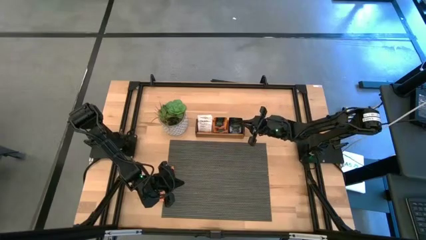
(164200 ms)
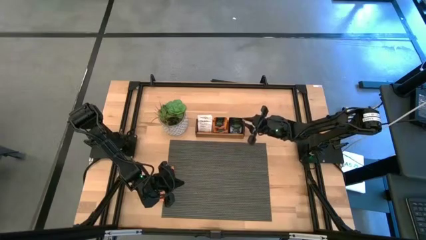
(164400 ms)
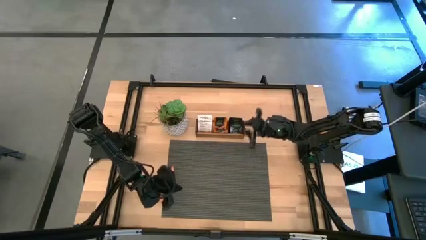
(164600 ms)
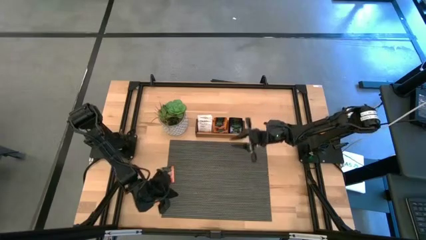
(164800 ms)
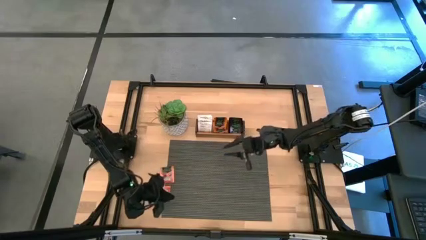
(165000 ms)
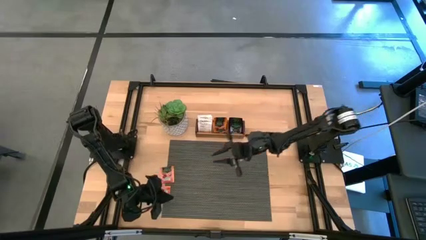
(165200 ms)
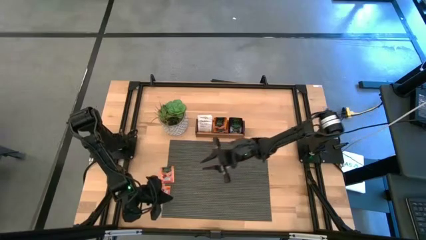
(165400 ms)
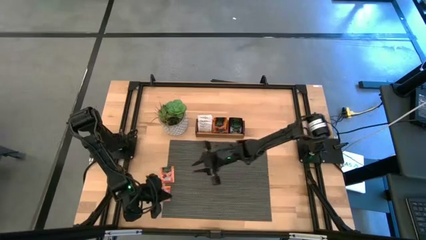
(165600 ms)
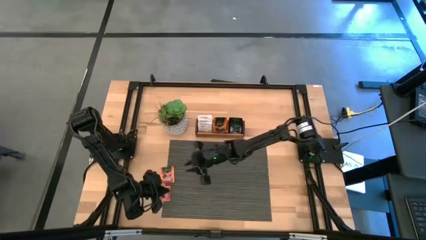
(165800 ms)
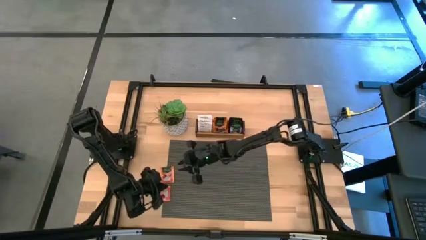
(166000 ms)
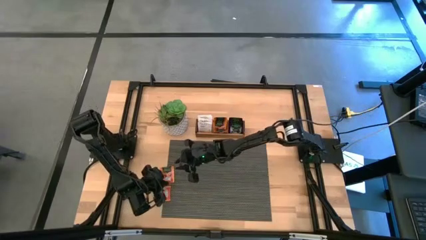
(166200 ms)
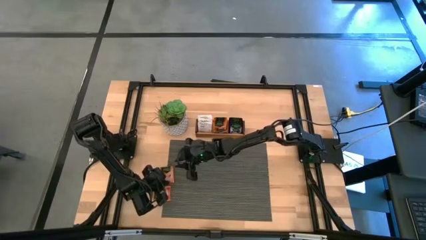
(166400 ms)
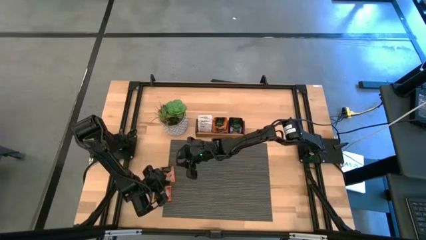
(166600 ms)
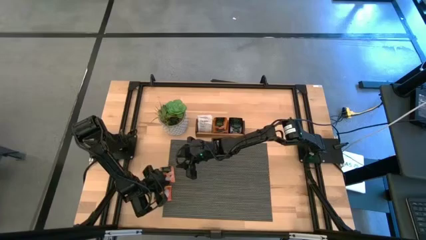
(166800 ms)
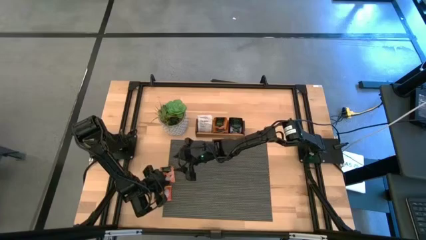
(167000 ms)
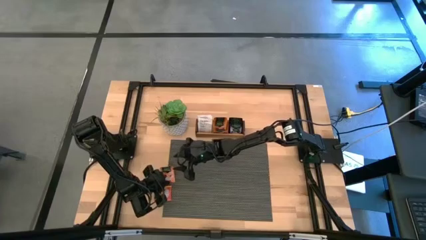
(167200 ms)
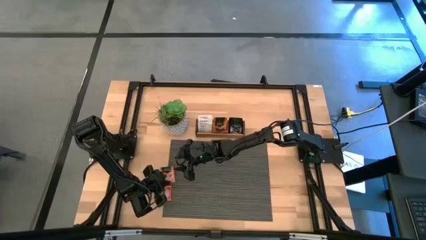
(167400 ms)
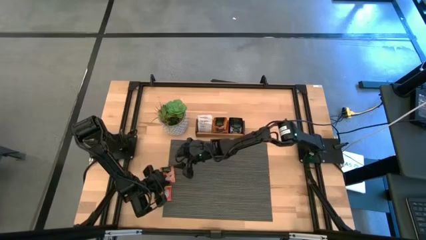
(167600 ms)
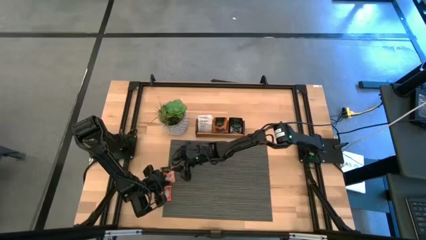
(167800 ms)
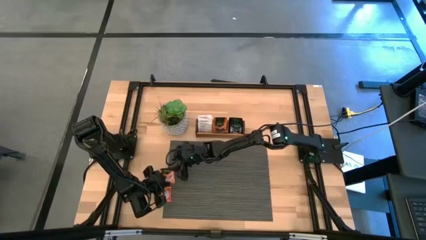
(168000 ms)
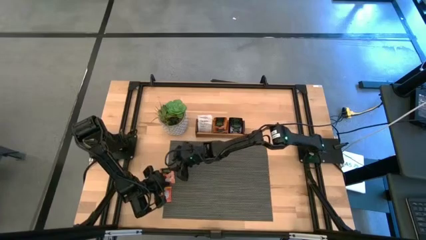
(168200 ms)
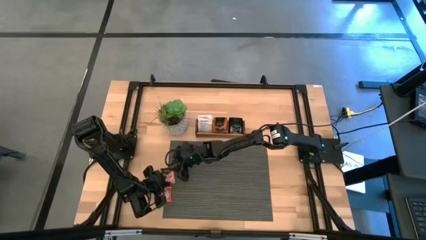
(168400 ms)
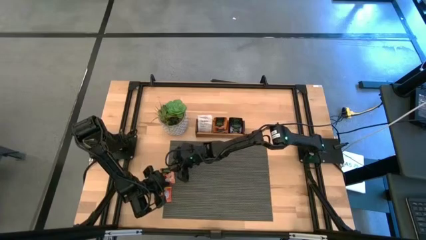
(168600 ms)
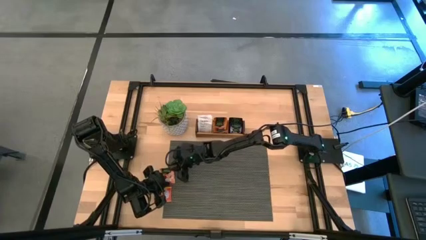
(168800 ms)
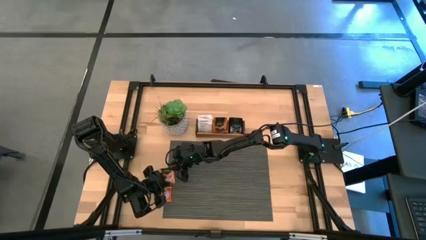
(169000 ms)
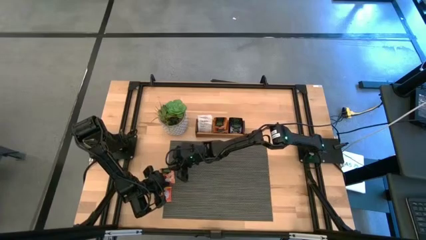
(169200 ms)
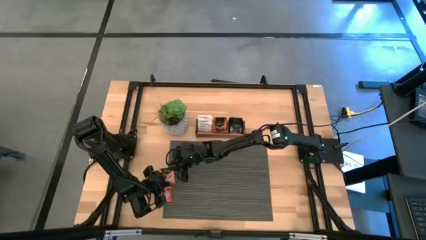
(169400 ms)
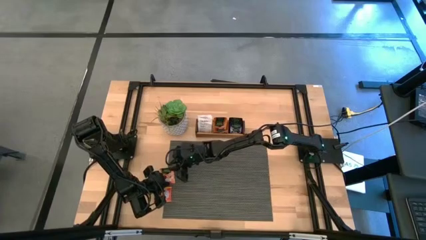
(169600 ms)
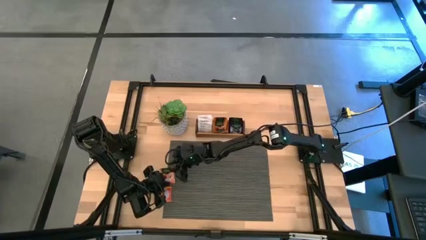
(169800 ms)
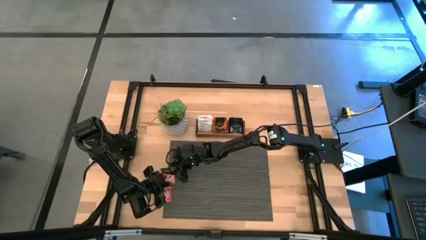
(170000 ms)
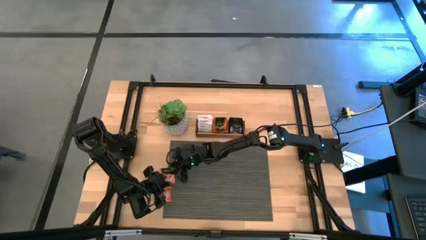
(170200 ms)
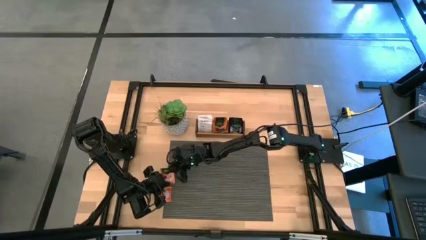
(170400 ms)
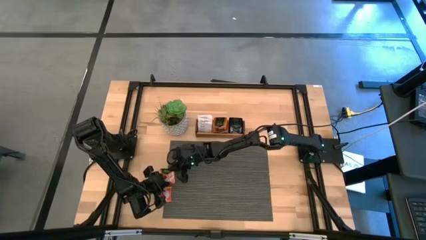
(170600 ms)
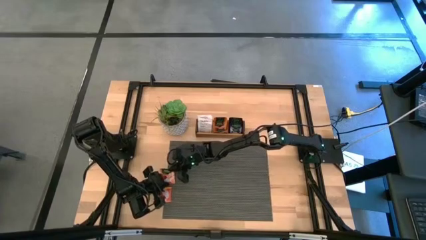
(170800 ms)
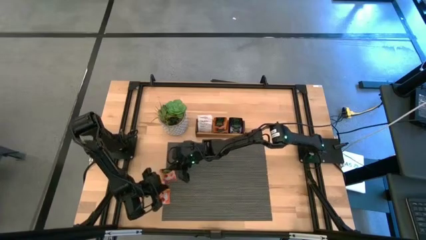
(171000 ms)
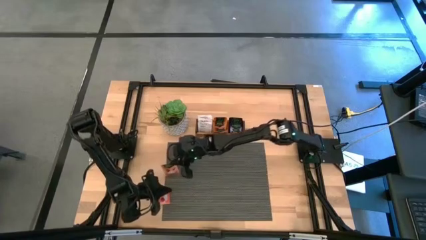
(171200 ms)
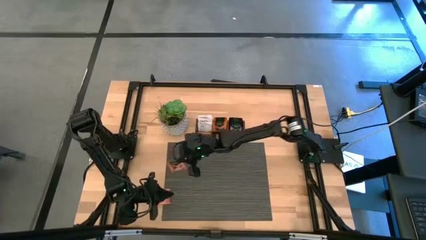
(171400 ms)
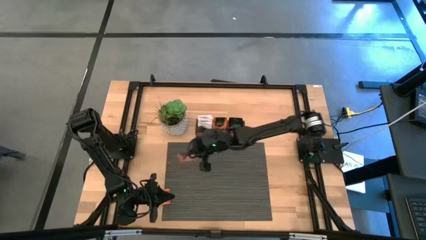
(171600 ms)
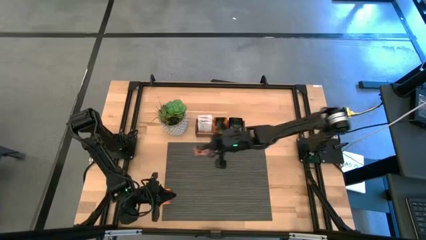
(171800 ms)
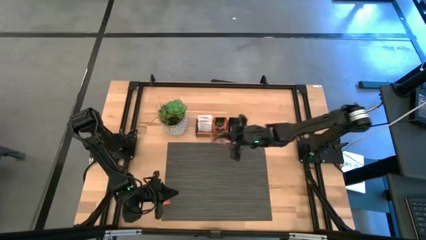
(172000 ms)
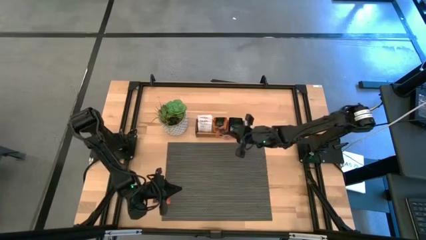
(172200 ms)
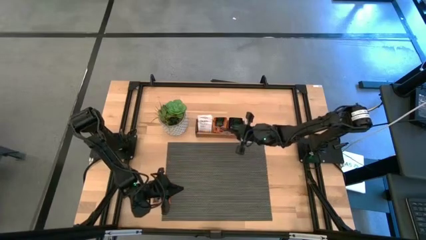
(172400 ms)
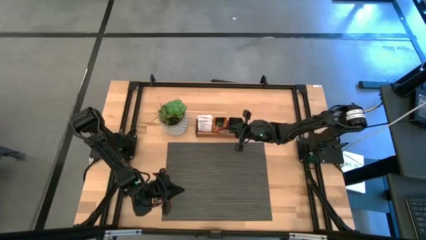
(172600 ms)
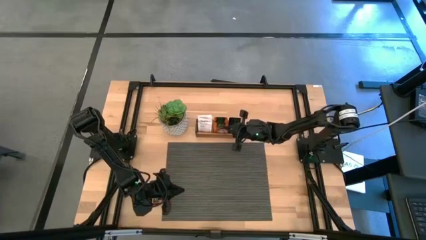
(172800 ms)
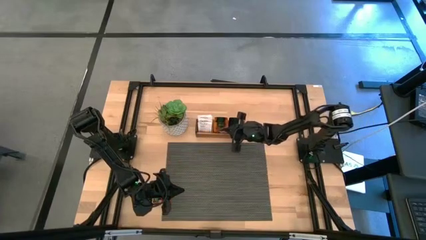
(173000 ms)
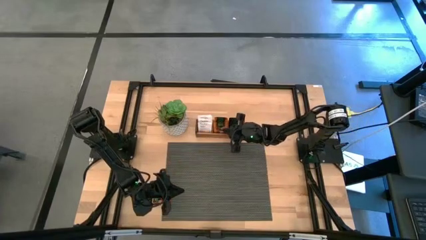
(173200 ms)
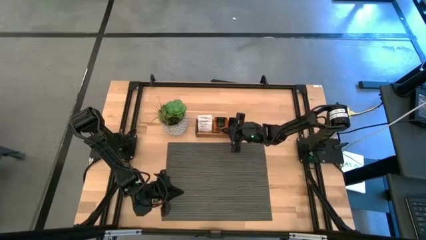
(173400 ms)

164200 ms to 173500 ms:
Task: Pick & Place Tea
Put the orange tea bag into the middle section of the wooden organizer

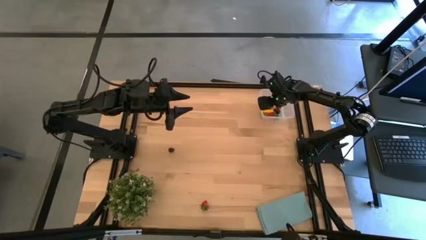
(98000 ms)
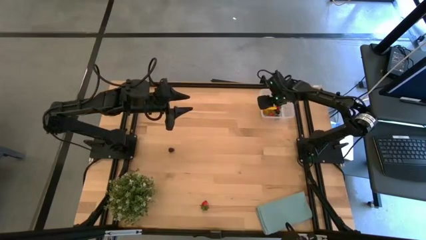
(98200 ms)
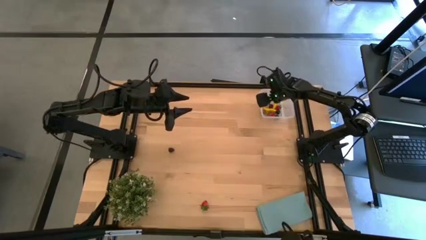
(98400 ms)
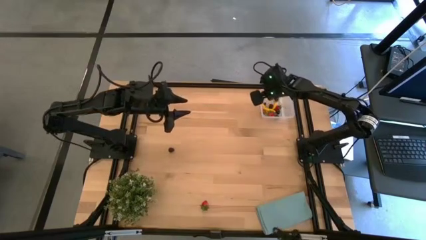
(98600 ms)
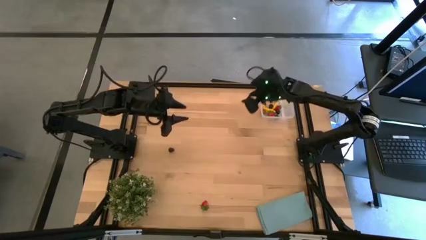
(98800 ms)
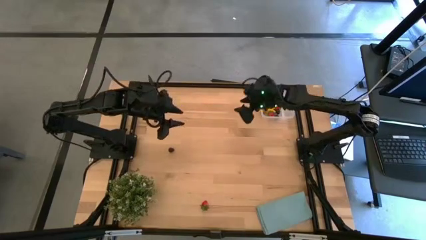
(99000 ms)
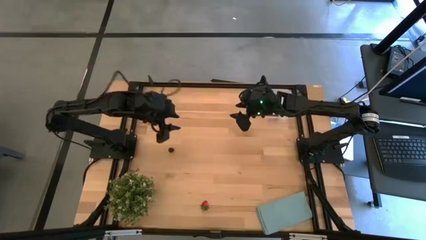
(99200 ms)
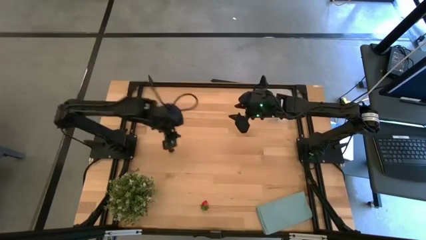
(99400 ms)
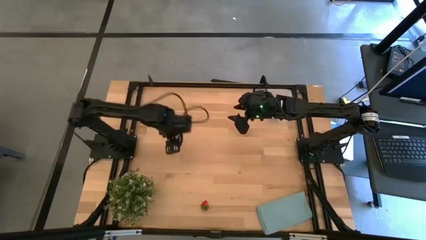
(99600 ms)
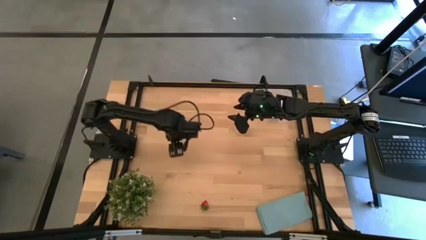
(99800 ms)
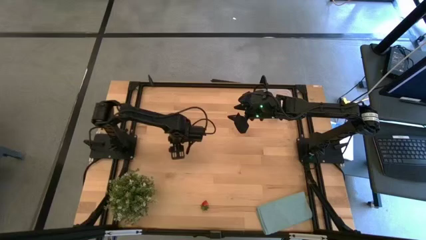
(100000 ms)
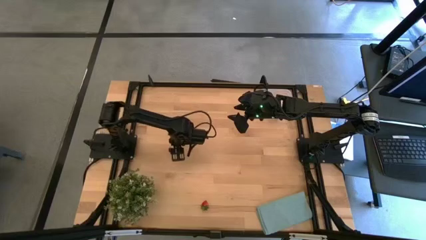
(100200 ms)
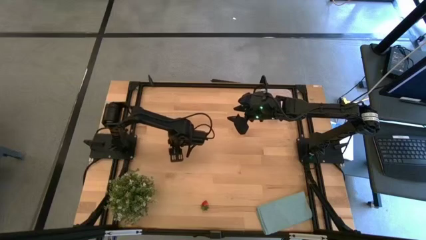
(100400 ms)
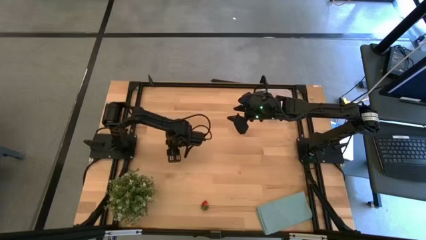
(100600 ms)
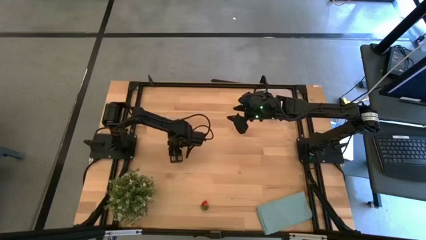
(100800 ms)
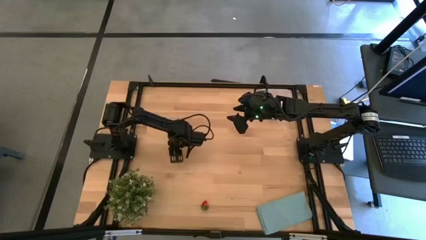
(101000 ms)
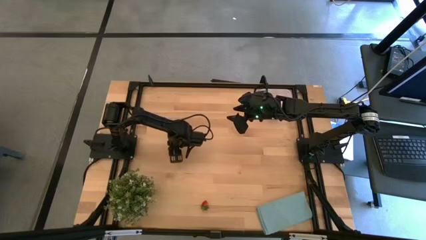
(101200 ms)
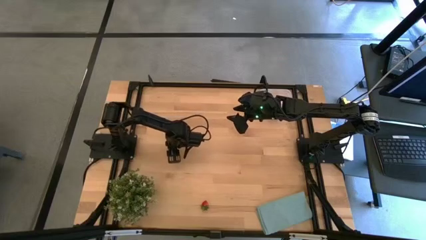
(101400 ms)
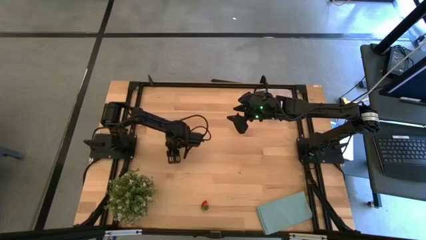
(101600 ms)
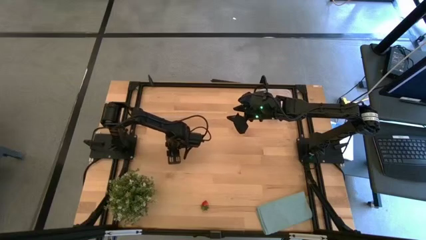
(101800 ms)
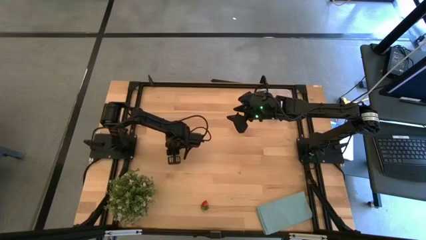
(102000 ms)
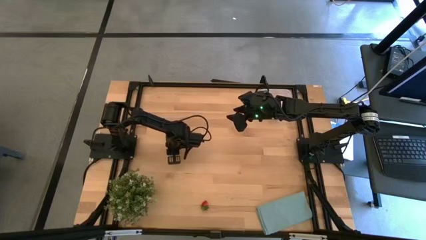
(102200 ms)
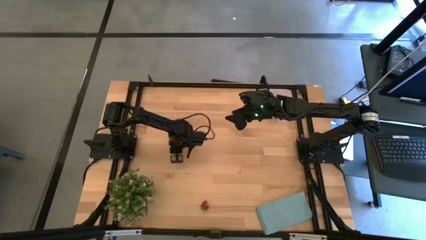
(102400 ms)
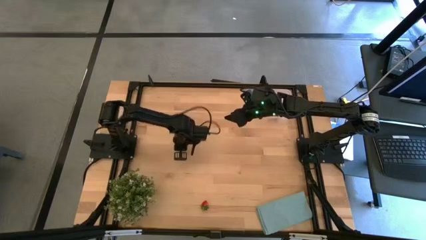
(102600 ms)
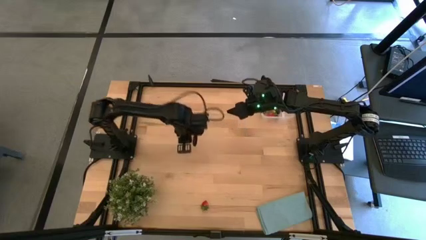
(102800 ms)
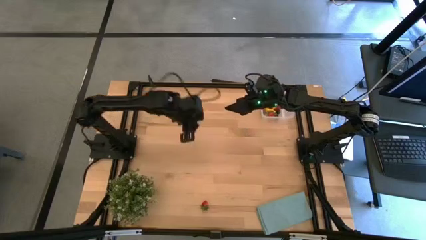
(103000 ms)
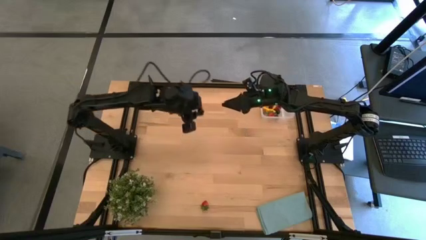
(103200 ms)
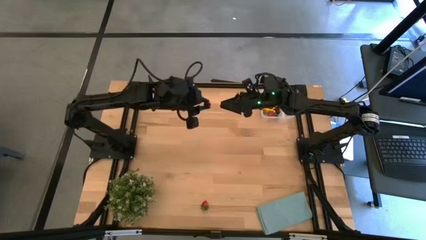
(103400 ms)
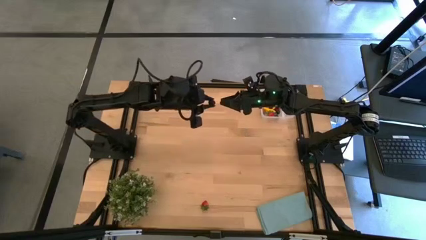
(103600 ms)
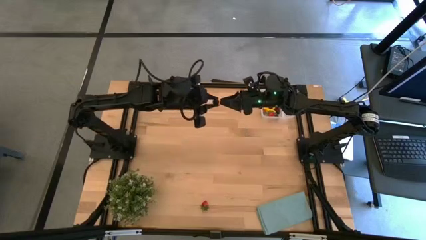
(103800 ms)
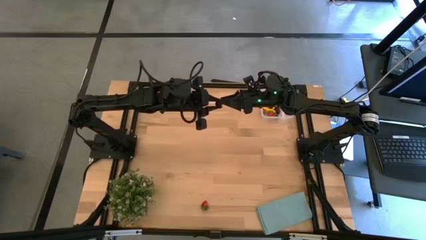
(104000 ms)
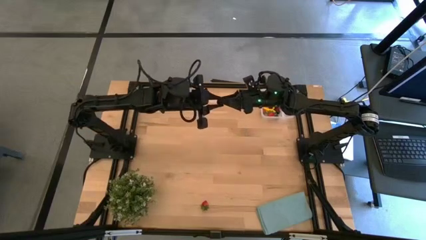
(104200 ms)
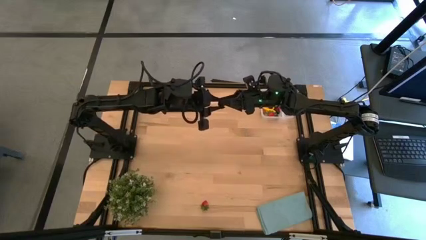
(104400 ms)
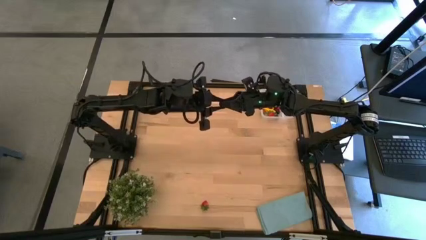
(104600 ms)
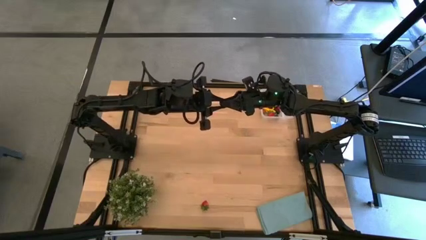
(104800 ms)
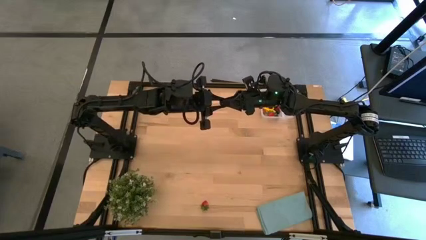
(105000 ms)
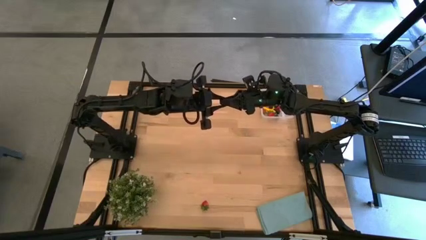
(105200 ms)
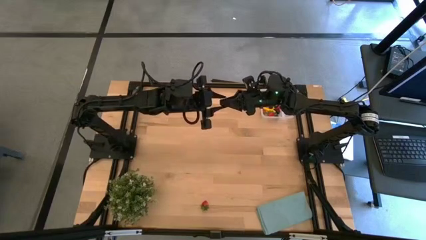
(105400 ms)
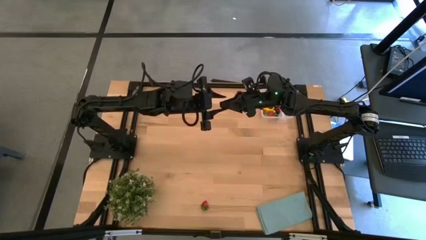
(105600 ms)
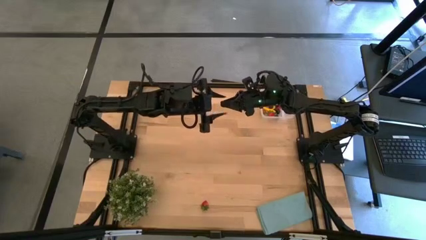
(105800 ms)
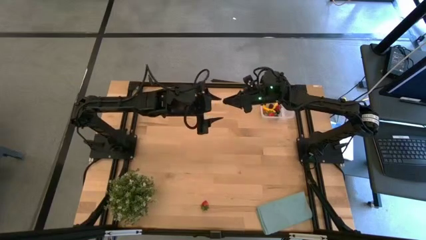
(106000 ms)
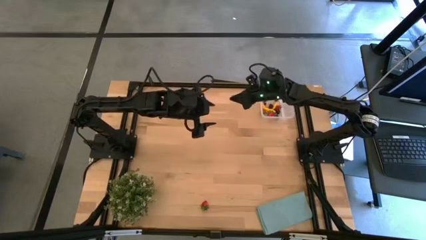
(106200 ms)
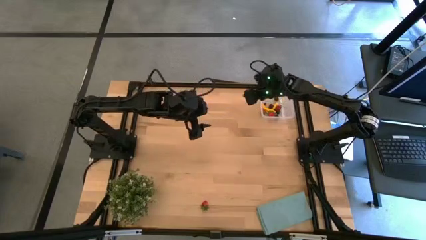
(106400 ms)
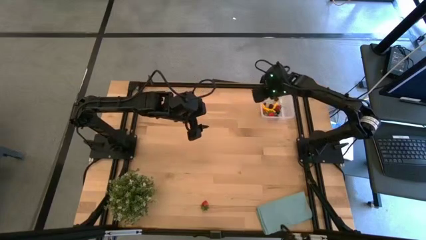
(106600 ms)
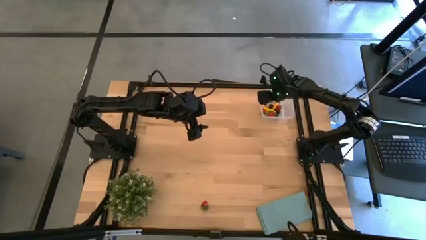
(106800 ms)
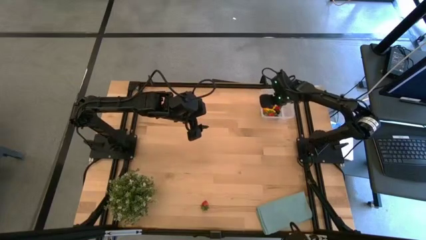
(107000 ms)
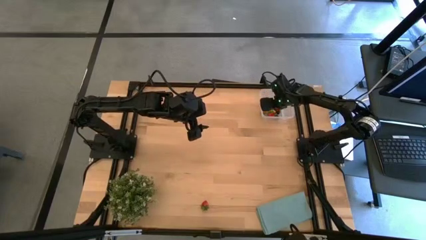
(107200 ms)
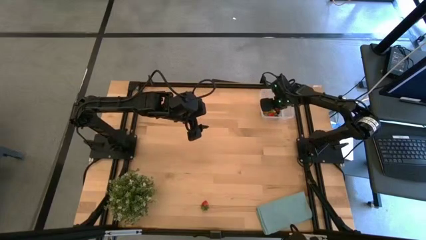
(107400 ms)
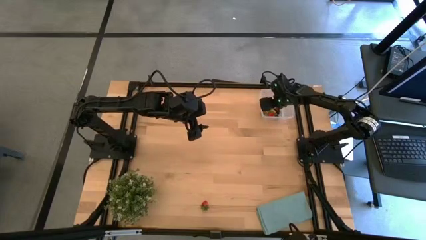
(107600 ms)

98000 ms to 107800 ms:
Task: Pick and placing Produce into tupperware
Put the blackberry into the transparent bin
